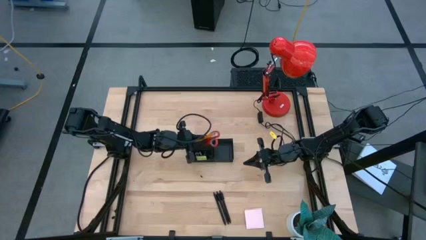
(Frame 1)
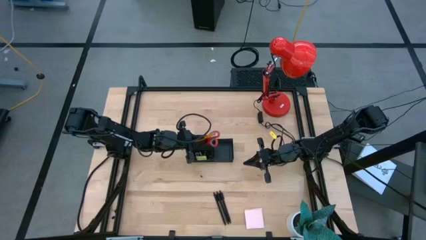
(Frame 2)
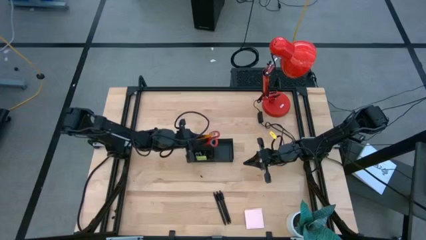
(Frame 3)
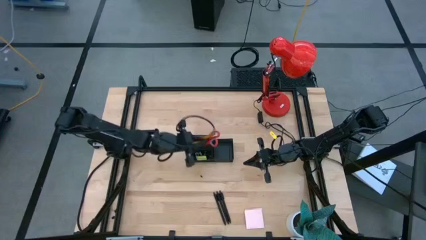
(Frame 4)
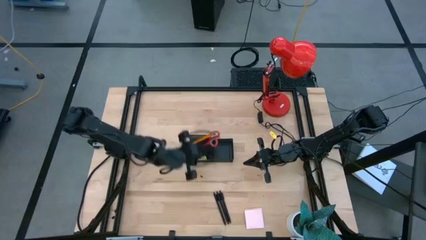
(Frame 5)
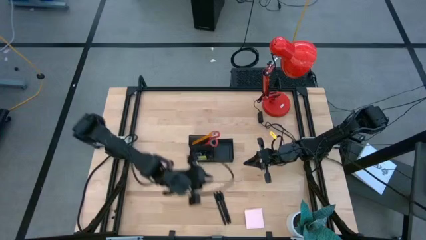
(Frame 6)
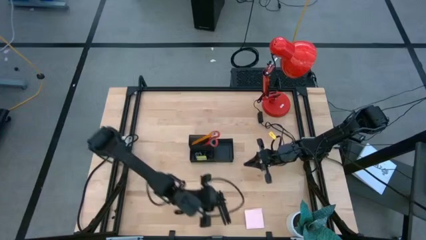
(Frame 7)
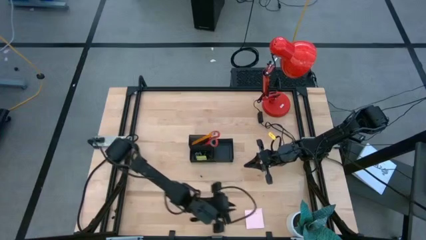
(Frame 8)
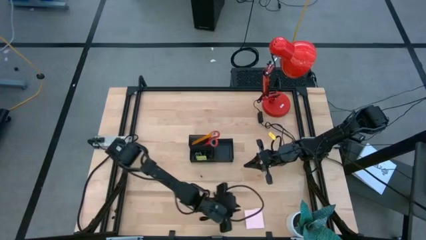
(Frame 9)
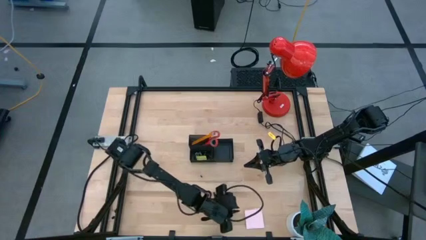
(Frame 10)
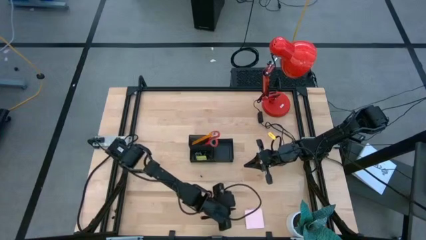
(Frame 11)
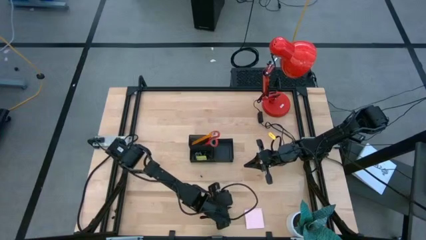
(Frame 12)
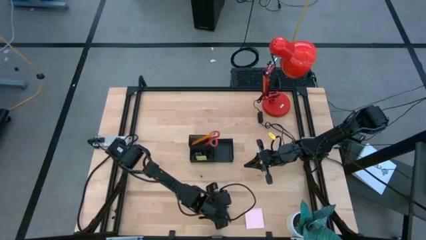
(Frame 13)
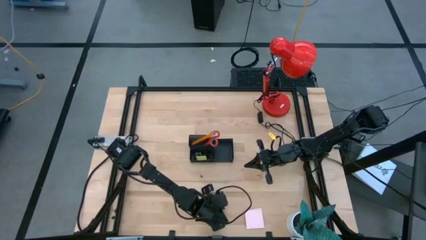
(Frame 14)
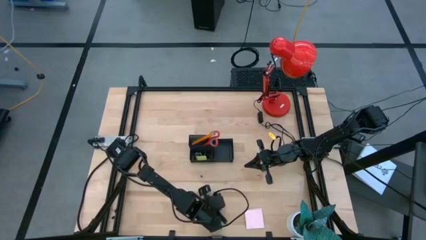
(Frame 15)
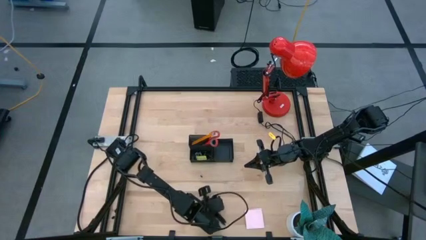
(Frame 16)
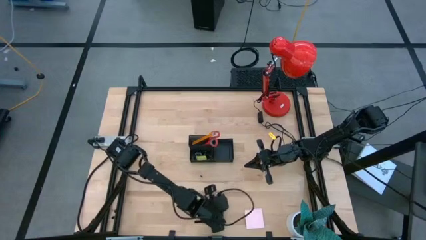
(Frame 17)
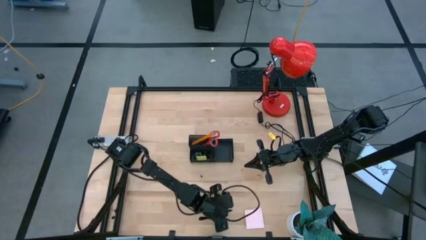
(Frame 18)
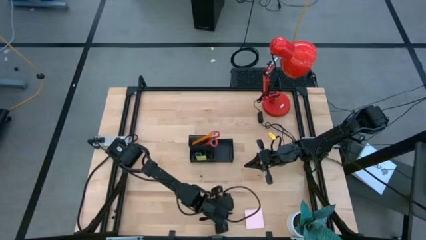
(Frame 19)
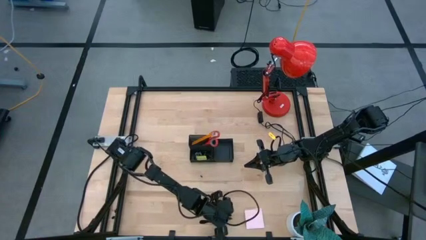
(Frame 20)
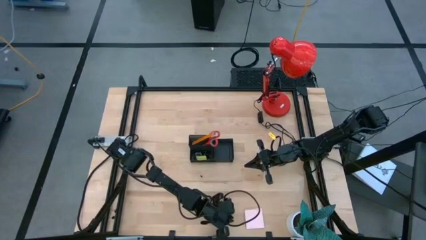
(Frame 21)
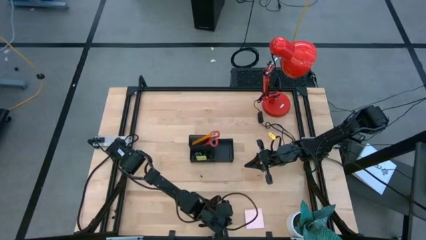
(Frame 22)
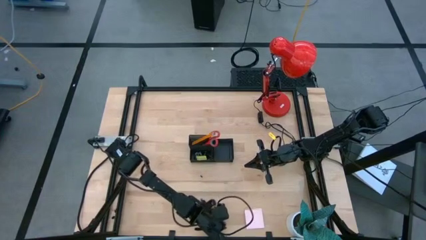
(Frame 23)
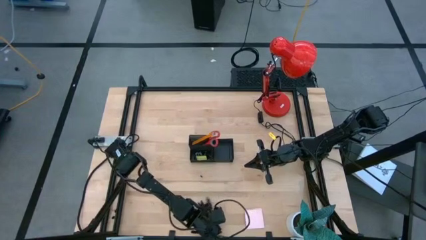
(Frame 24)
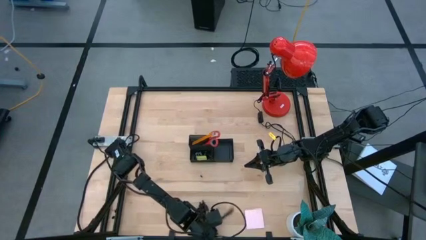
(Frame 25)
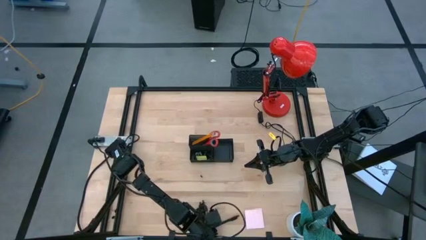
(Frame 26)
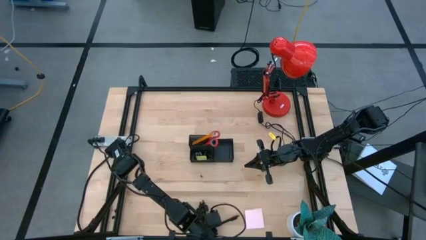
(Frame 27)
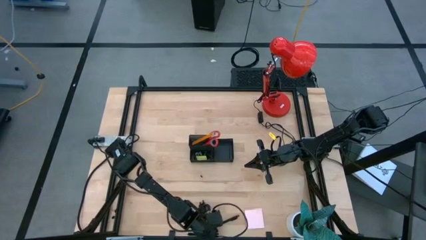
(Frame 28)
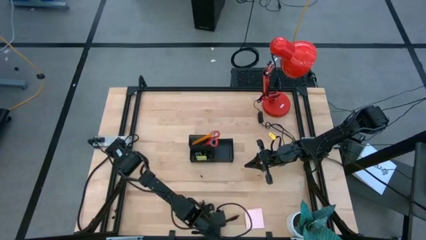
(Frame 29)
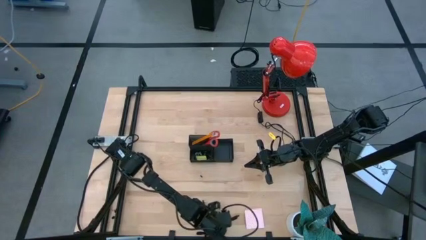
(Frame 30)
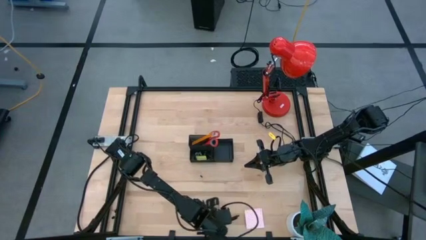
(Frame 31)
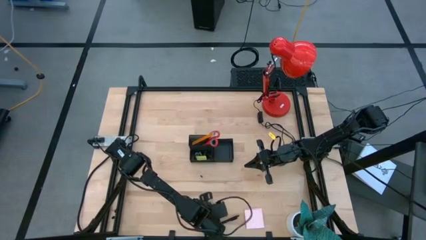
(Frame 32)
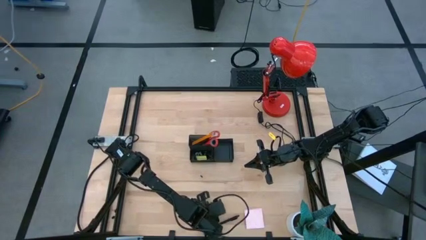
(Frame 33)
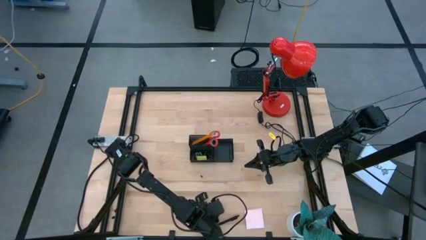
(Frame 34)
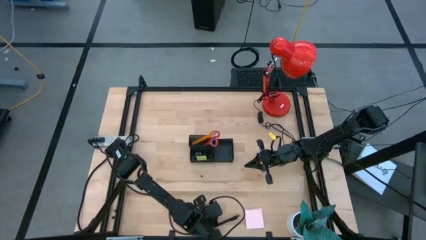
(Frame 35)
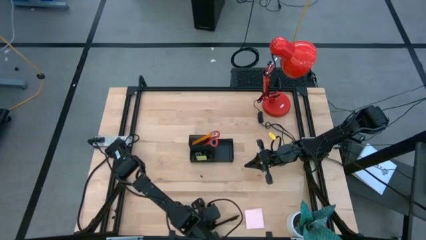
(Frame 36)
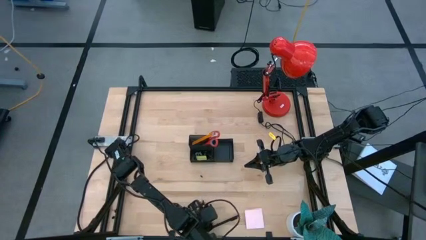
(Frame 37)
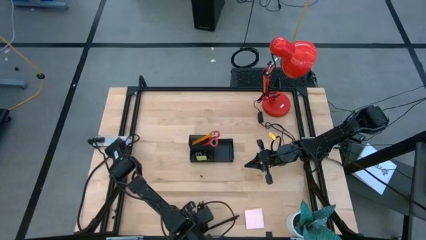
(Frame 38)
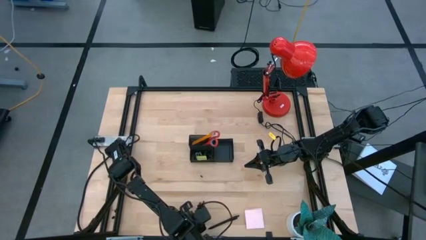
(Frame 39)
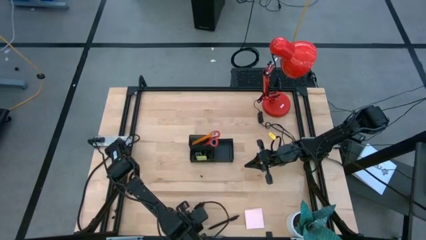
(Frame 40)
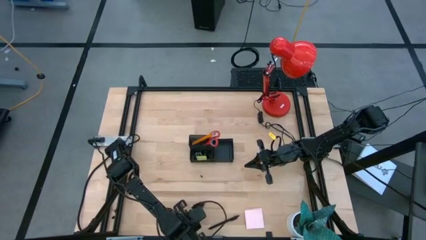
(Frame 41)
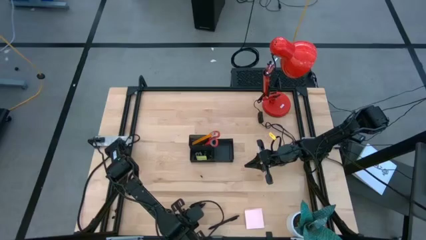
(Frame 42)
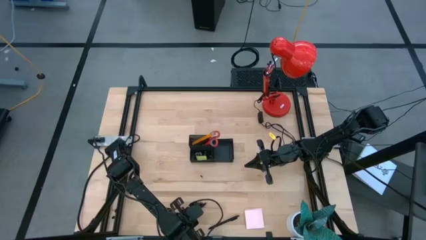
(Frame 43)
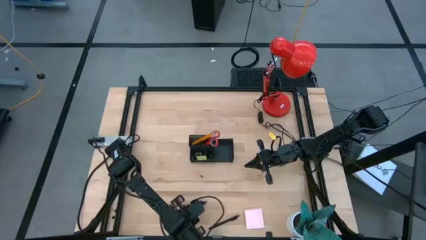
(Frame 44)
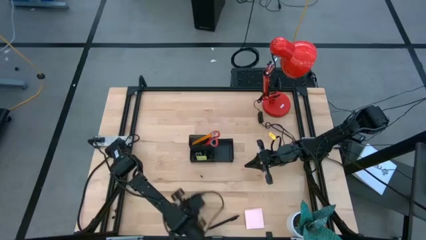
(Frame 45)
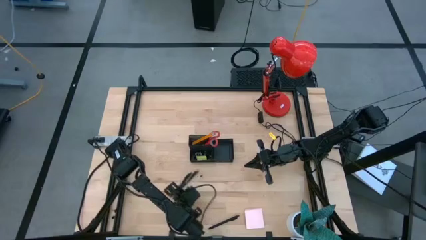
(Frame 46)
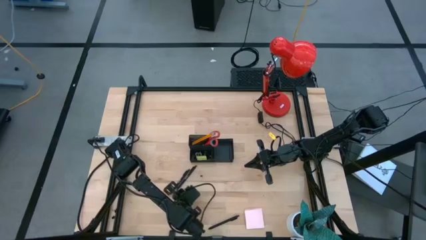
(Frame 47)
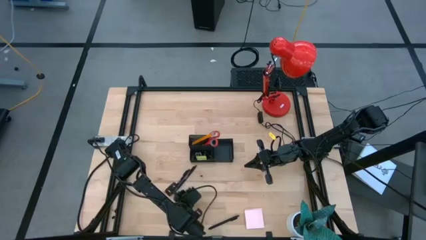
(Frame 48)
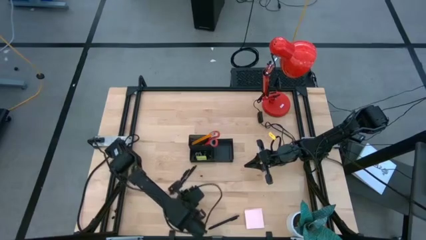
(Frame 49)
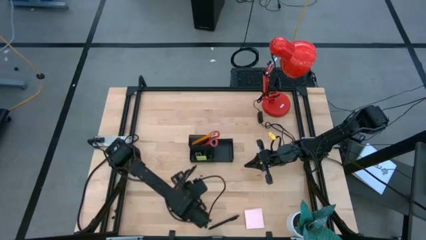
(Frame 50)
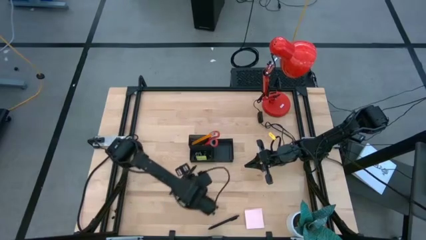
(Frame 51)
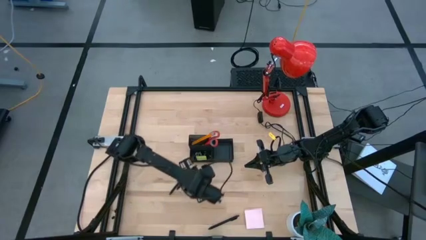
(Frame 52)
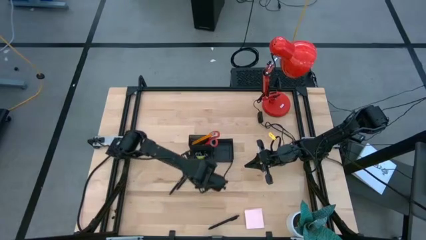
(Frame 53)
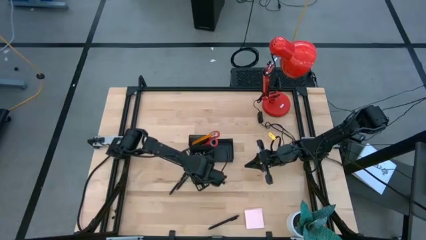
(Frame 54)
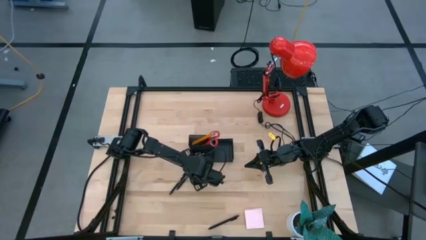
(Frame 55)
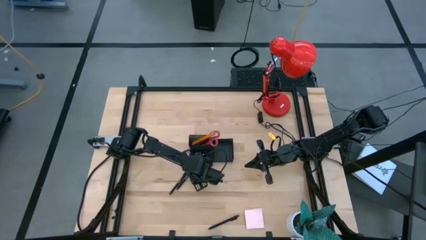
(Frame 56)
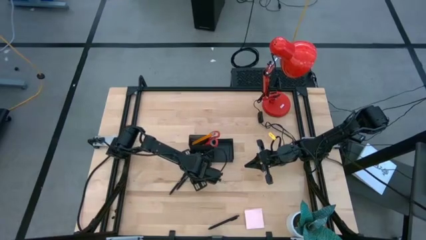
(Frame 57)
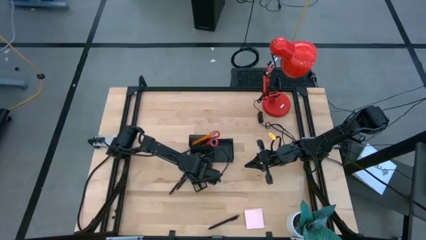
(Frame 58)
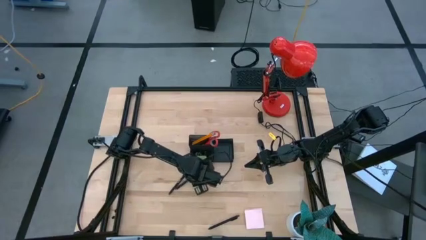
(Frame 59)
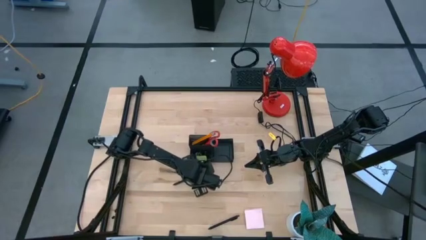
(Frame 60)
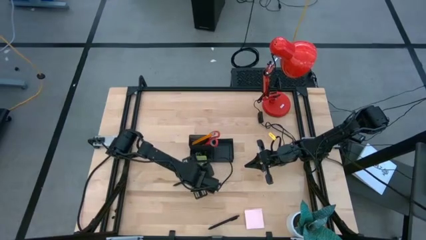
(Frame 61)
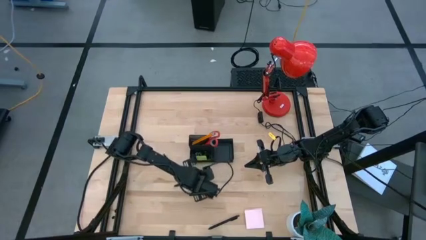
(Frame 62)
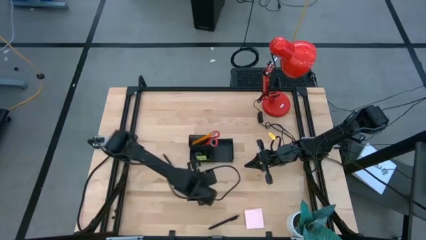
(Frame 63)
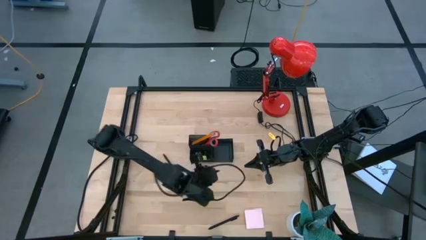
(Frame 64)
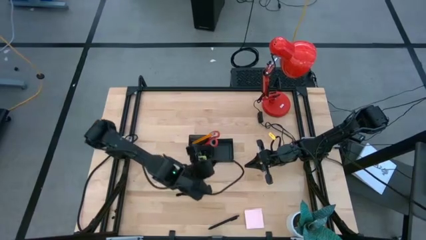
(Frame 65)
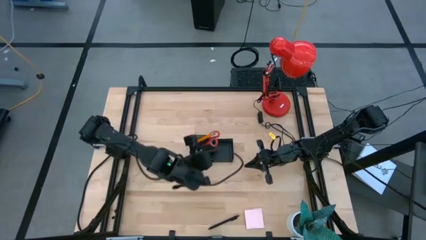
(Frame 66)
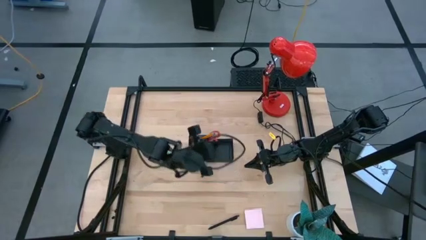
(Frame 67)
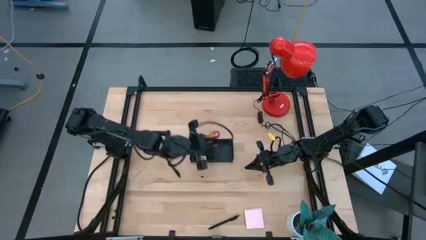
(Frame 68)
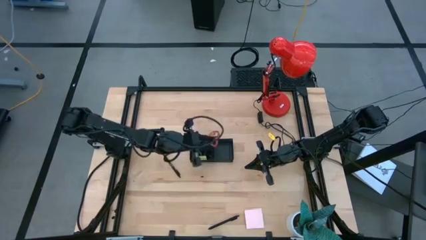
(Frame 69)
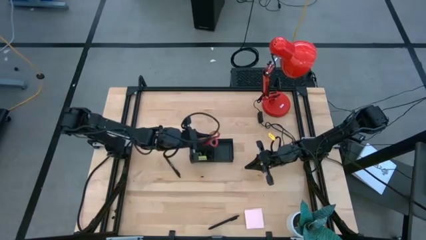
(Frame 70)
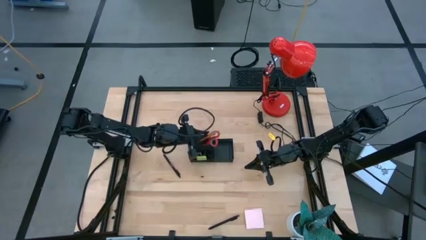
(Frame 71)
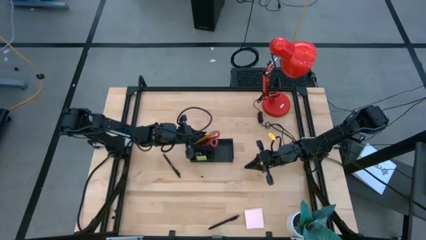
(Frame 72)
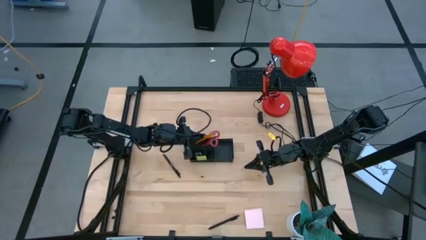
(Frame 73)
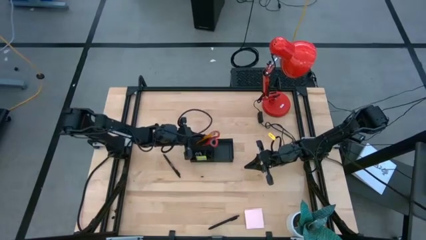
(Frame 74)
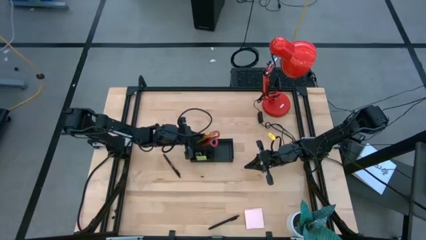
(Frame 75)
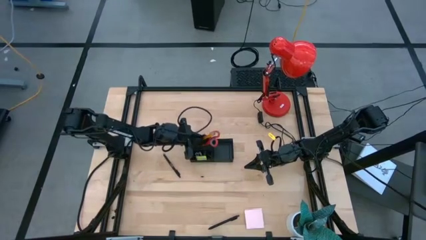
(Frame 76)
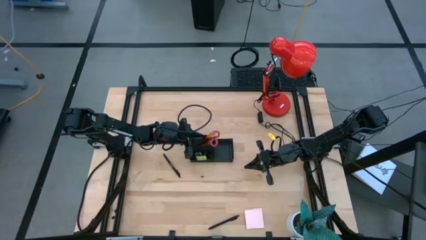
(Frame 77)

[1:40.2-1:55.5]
Task: Pick and place office supplies into organizer
Put the black pen into the black desk organizer

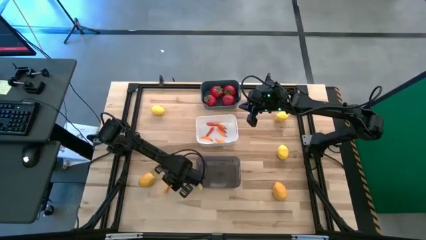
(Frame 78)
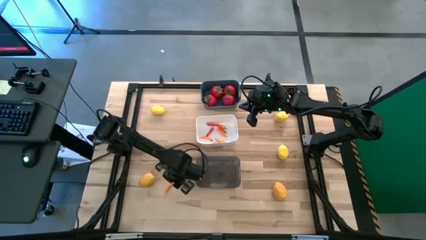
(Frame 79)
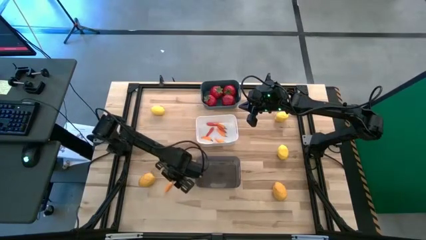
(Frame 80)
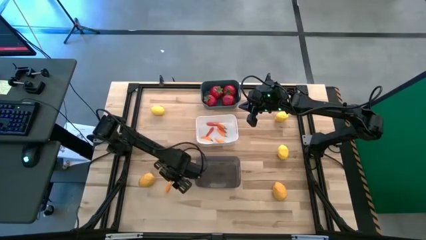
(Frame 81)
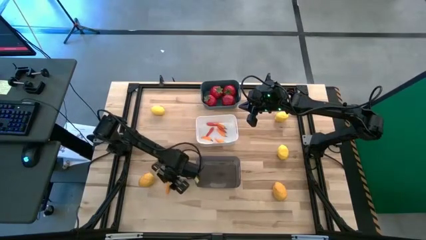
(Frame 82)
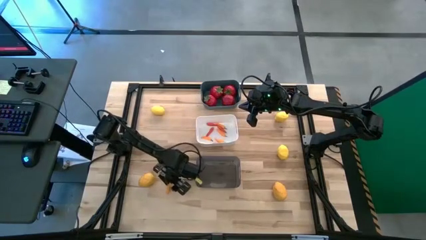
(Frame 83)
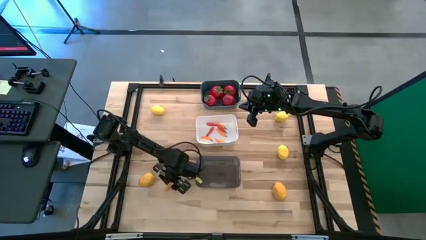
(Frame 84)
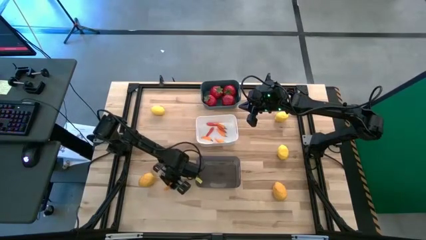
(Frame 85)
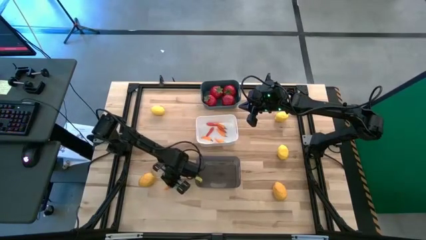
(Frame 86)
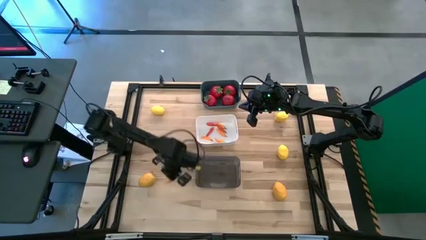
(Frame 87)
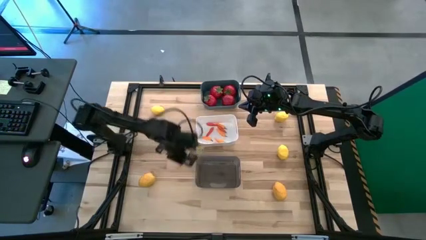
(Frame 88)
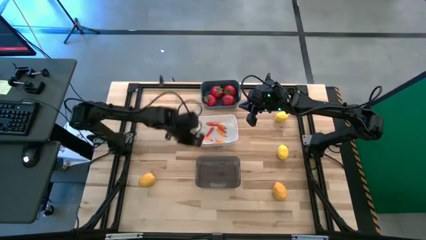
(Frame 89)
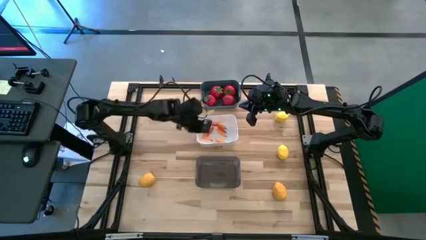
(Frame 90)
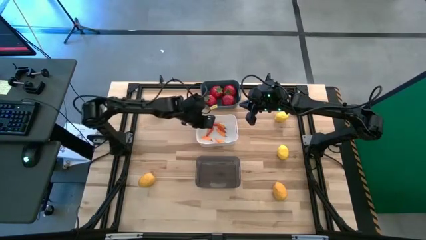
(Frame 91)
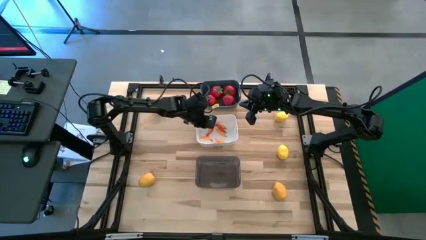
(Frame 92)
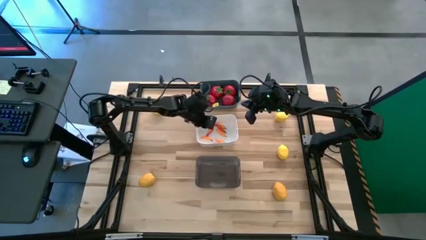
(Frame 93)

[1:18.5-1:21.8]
Task: Sort produce into baskets
Put the orange chili pepper into the white bin
